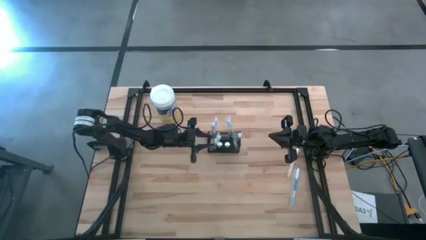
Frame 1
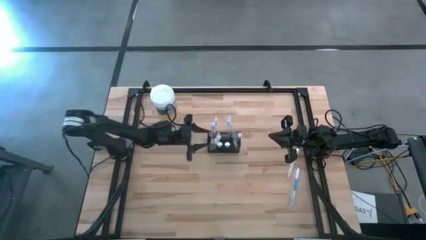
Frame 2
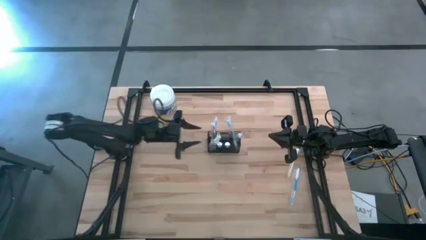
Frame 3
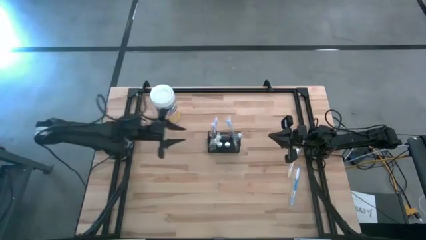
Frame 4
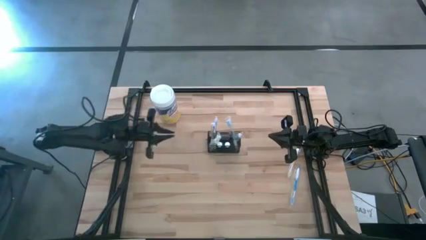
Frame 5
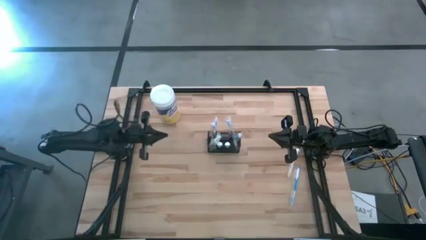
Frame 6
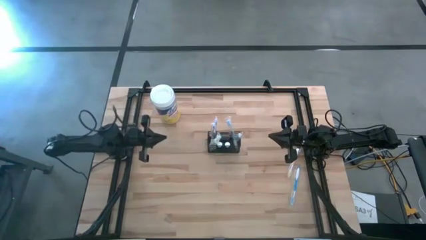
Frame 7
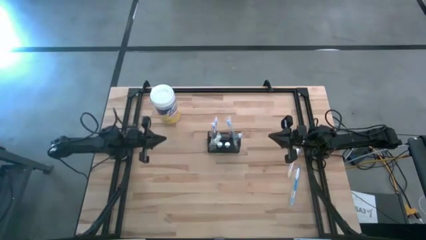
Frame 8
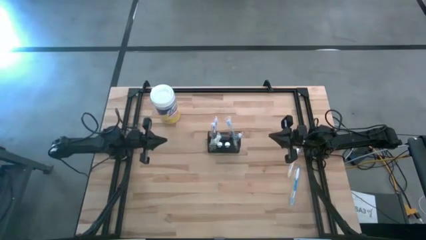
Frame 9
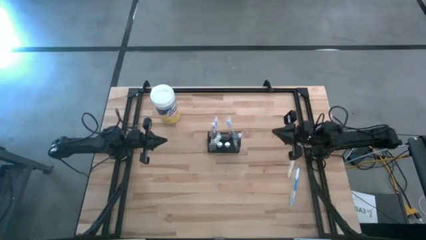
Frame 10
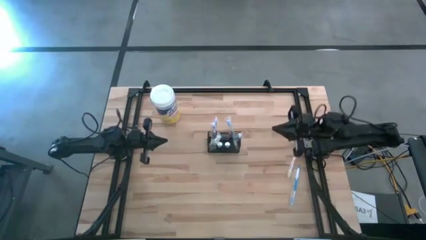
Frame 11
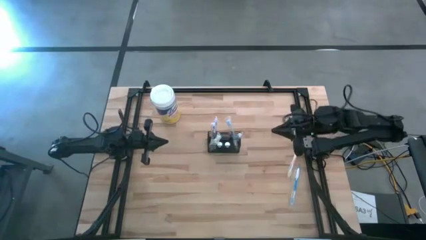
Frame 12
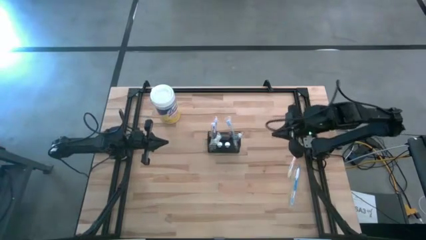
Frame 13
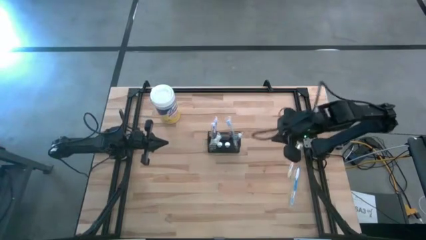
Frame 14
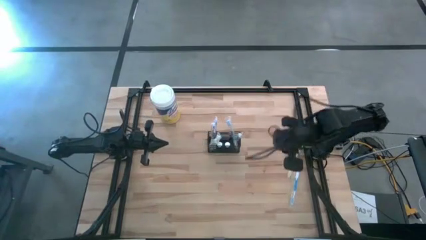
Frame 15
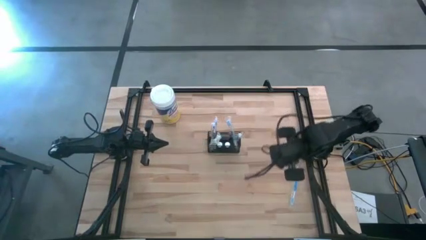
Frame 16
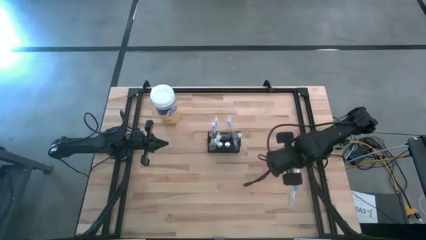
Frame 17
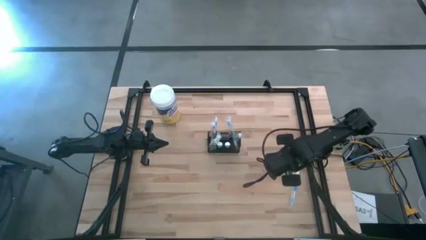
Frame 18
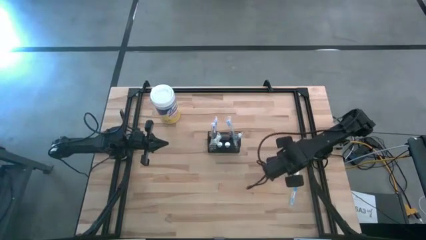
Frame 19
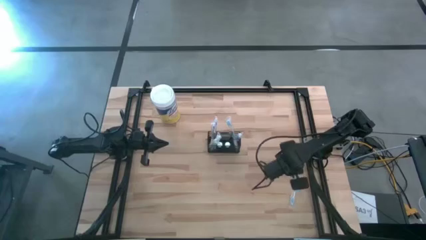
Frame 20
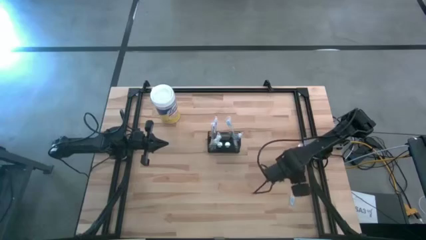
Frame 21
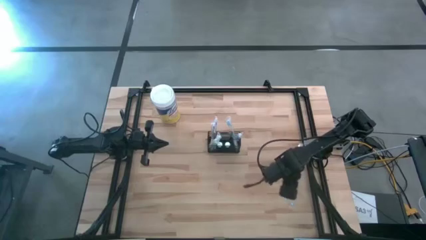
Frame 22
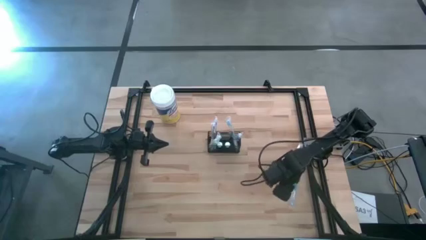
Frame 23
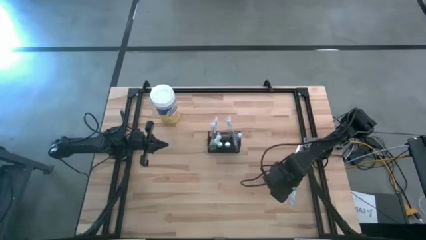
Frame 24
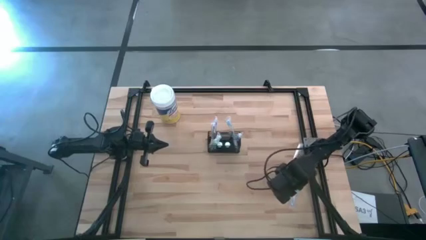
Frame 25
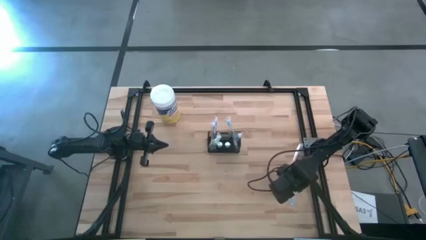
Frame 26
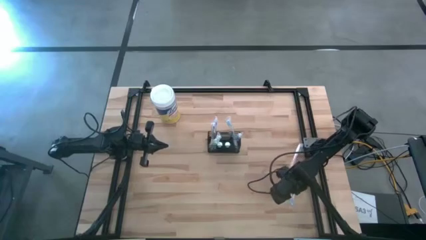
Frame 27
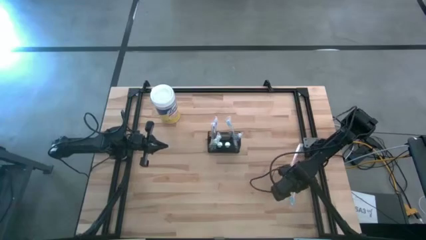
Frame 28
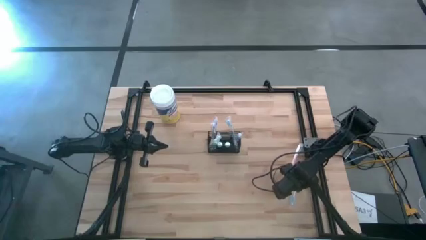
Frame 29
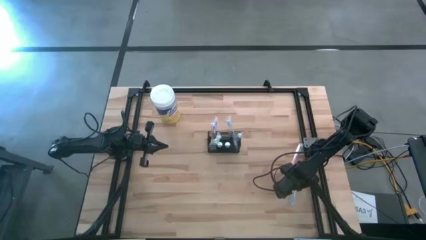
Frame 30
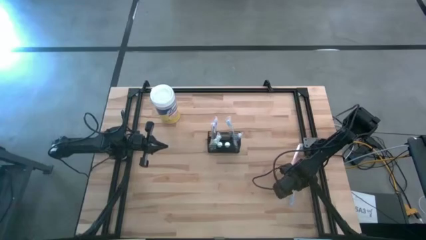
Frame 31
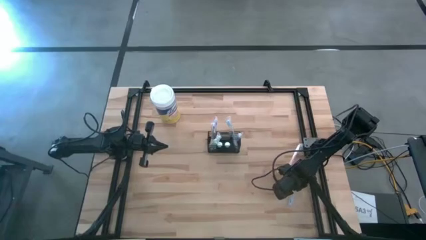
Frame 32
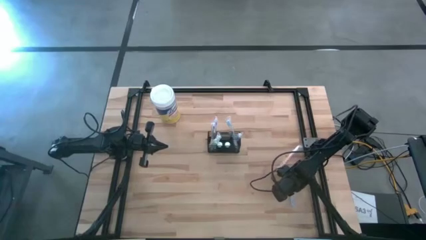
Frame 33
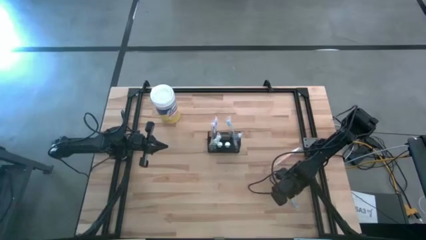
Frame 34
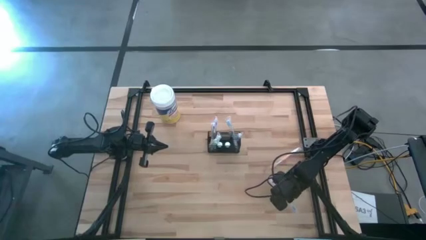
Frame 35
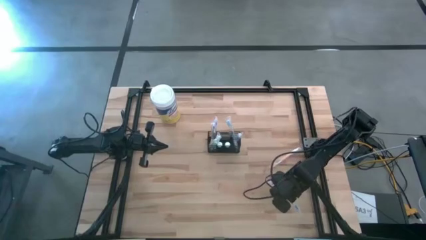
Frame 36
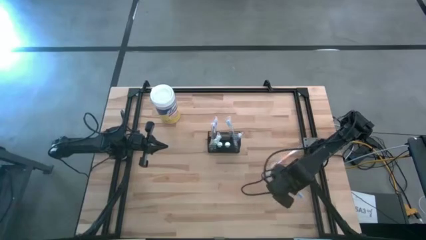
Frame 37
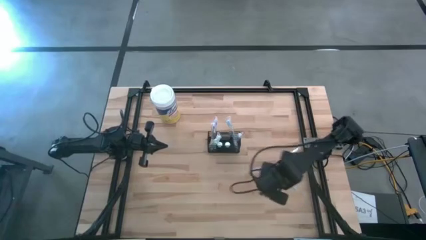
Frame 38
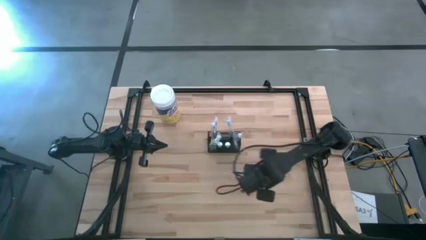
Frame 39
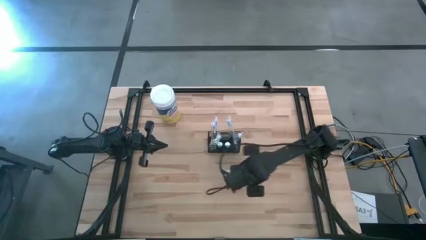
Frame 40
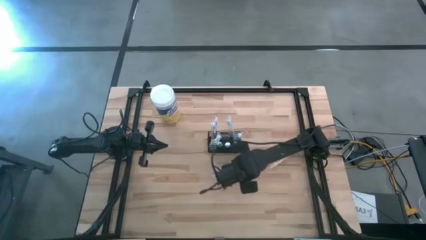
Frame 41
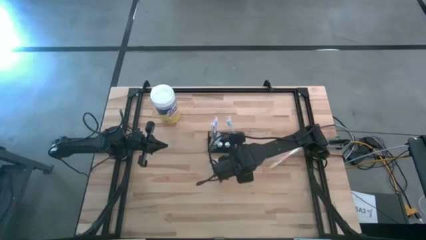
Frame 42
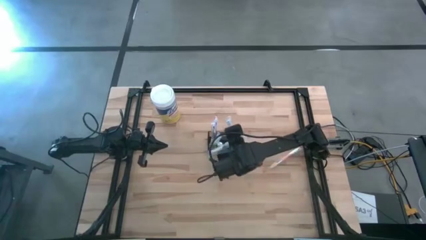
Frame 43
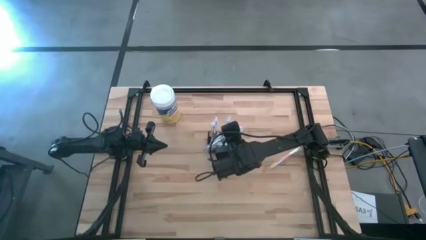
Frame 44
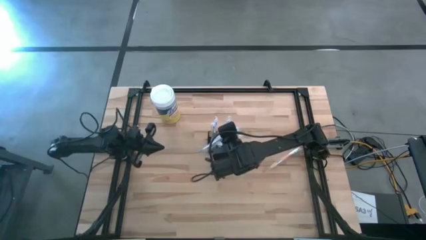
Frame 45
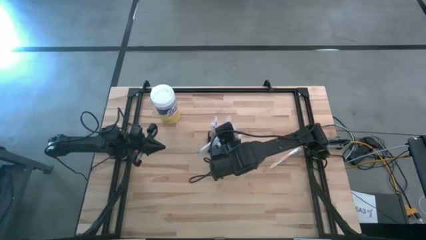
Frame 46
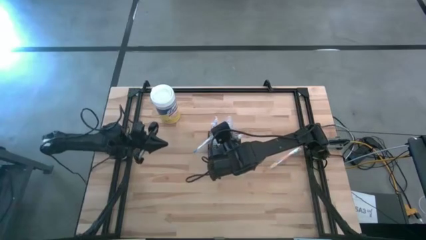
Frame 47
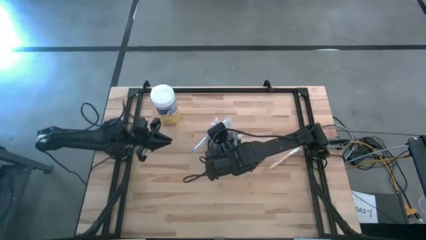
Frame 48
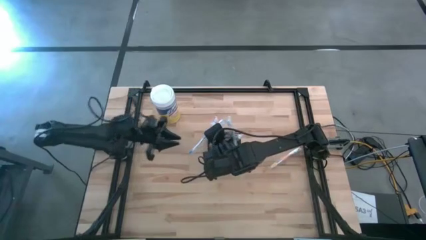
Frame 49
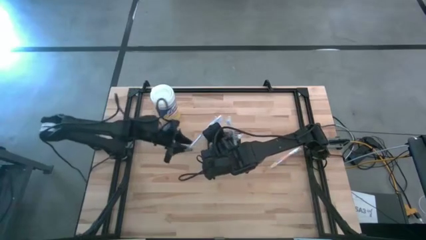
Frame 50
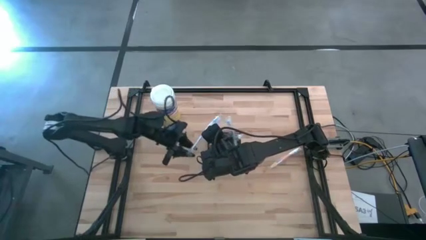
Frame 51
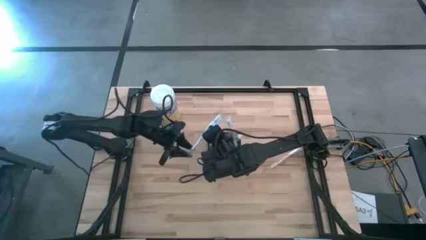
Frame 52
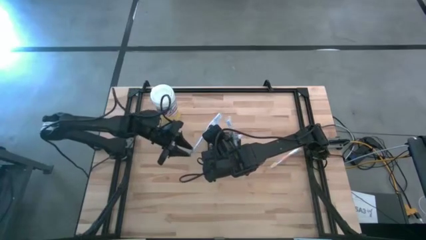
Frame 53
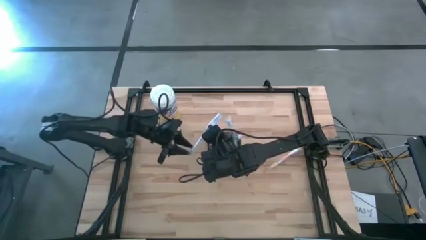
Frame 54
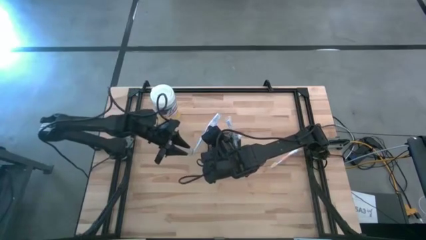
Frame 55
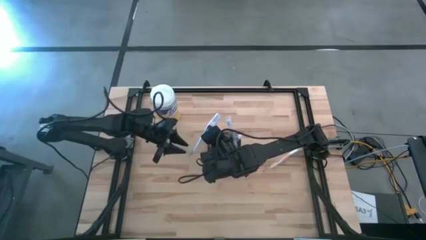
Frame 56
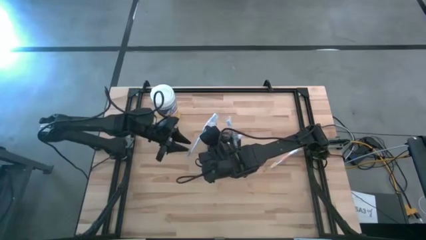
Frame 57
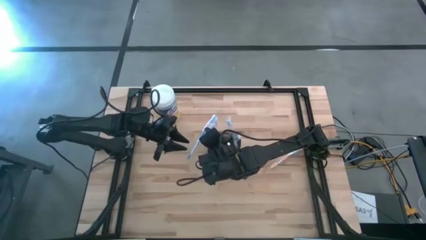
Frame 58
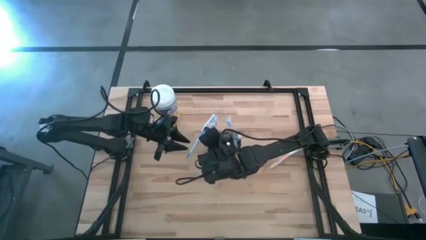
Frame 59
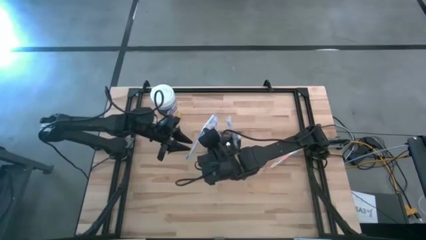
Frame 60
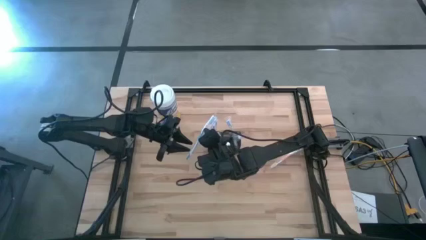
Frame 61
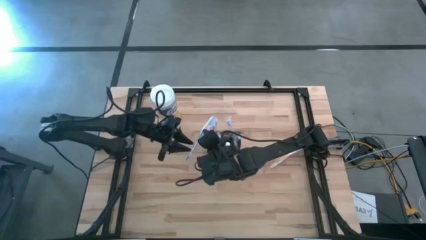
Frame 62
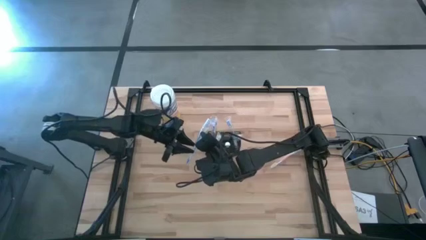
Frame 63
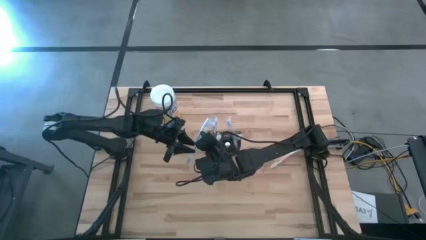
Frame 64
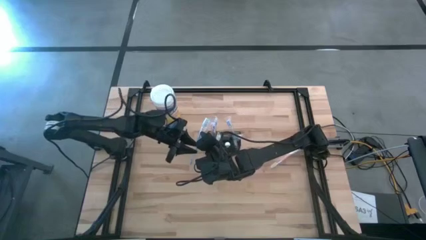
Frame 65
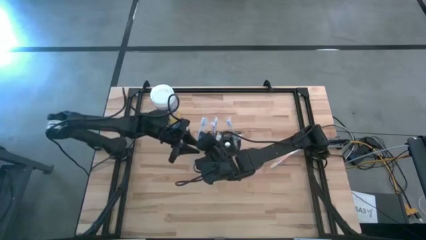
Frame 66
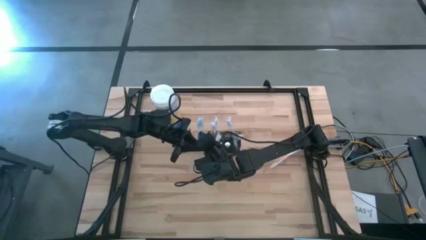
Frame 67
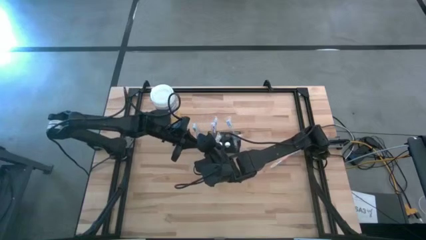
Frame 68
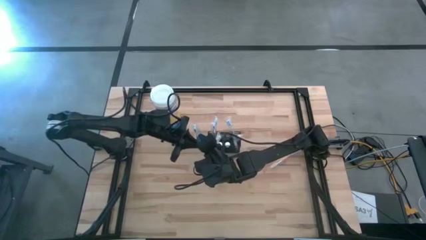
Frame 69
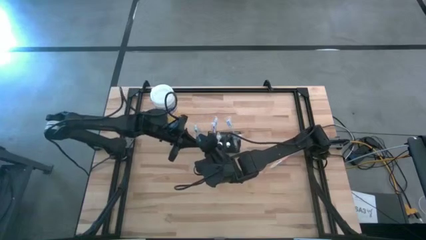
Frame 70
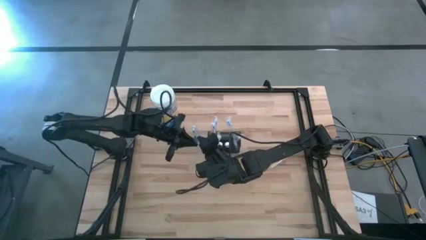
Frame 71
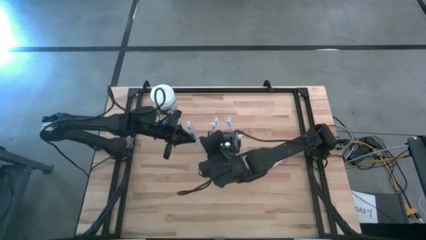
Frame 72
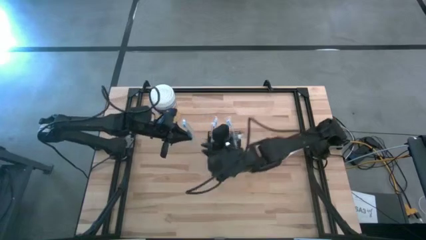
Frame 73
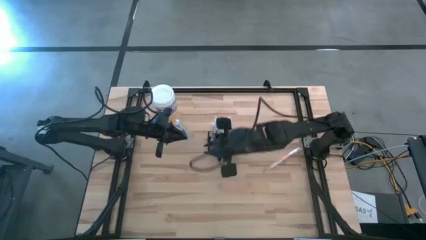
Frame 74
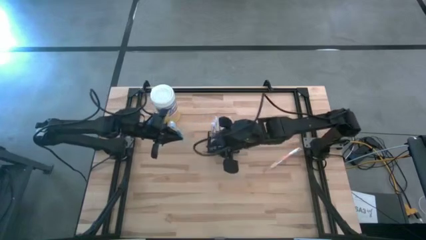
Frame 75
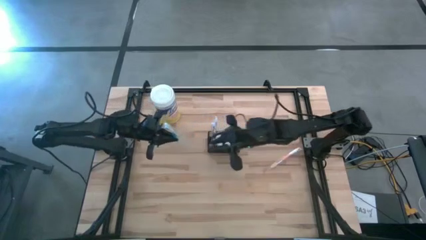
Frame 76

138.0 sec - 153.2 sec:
Task: Pick & Place toothbrushing station
Put the blue toothbrush into the wire organizer

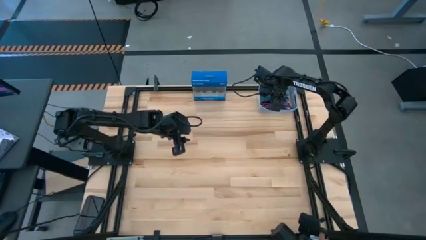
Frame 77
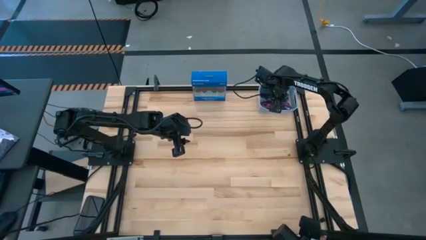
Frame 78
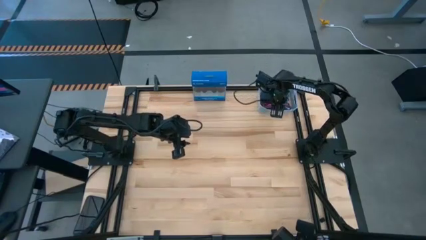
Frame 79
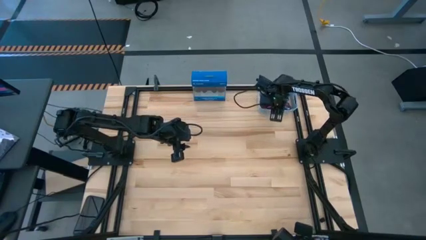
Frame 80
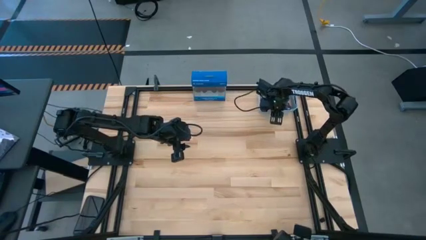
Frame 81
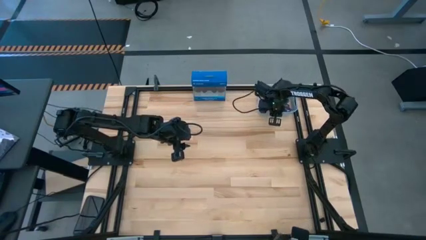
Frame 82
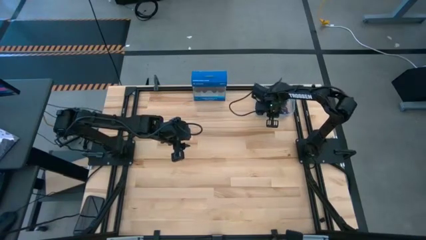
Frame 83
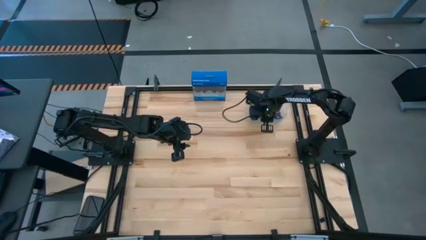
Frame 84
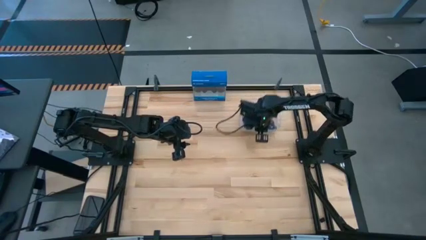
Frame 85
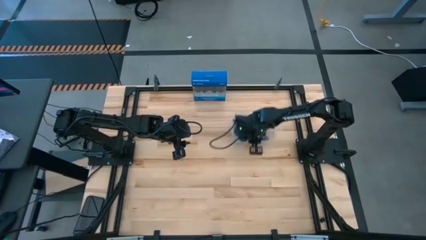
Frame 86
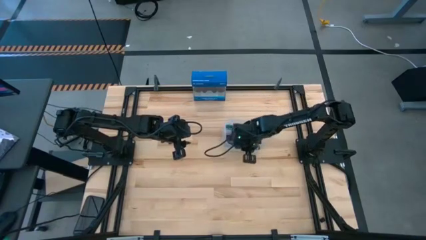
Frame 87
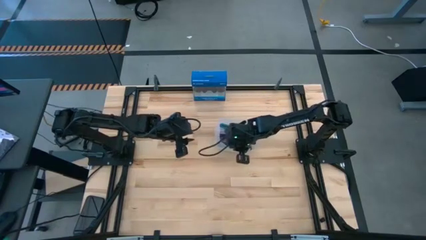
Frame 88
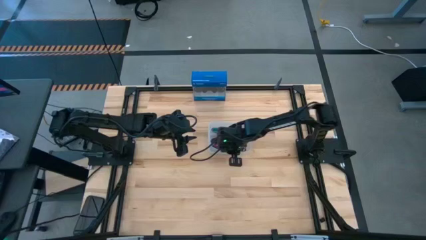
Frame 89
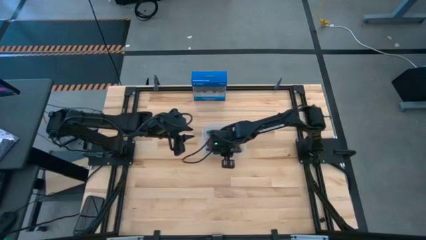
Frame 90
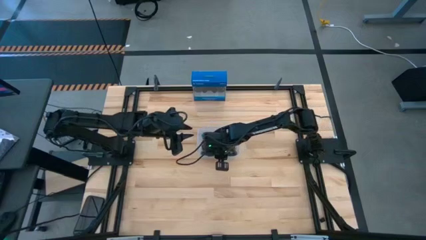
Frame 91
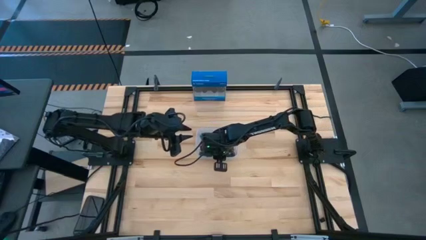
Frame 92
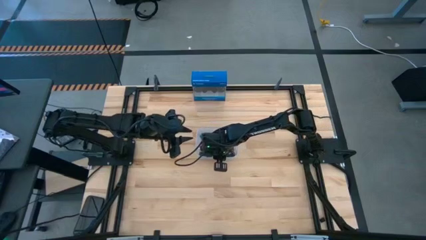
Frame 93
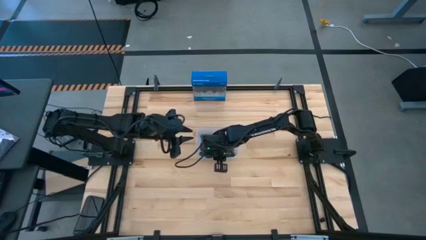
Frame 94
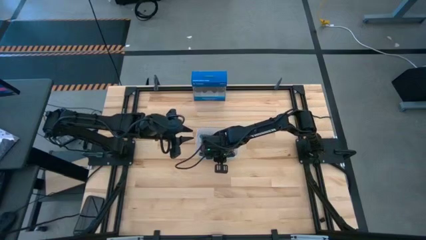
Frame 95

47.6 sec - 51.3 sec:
Task: Pick and place USB-C Cables
Move the transparent bin to the center
